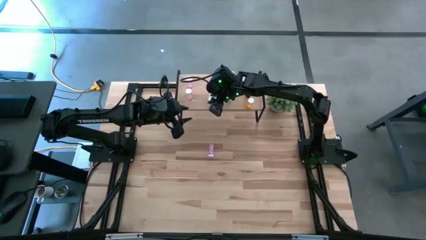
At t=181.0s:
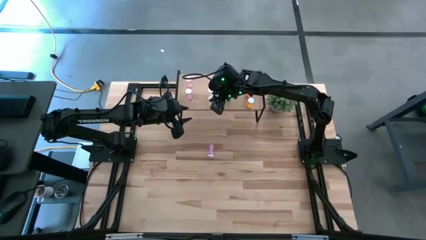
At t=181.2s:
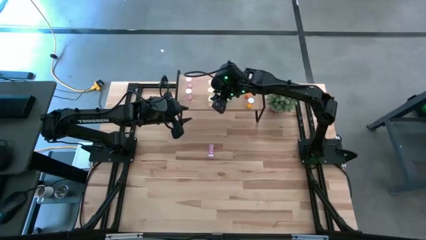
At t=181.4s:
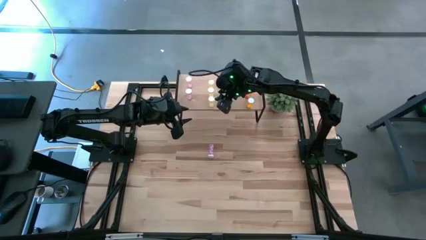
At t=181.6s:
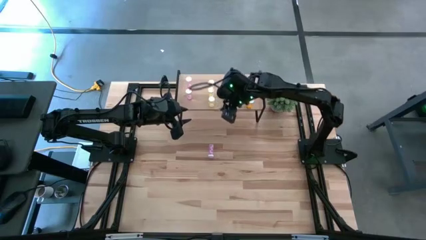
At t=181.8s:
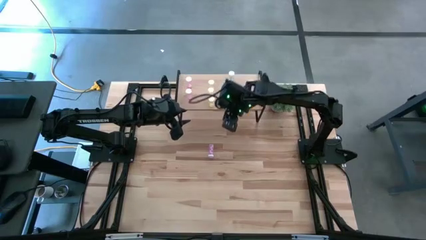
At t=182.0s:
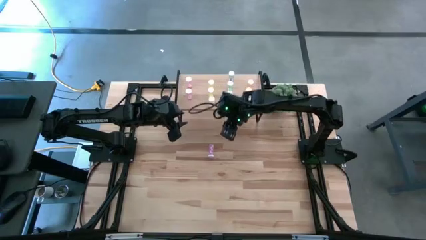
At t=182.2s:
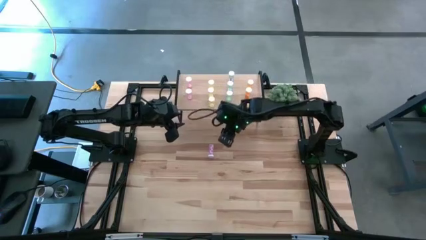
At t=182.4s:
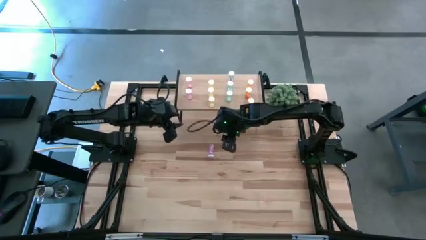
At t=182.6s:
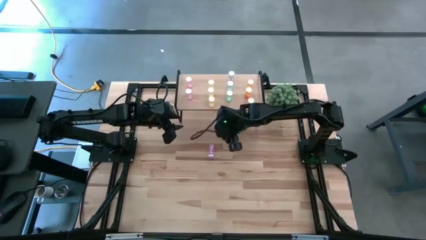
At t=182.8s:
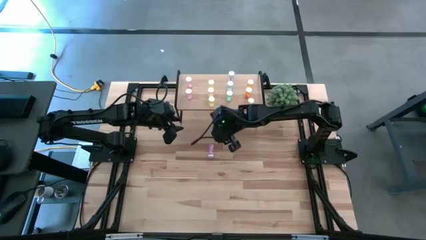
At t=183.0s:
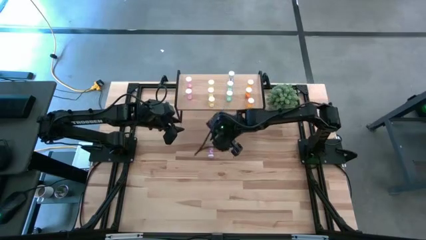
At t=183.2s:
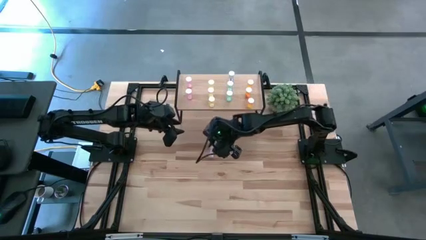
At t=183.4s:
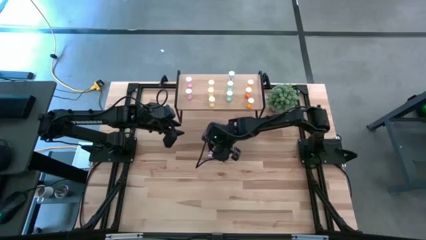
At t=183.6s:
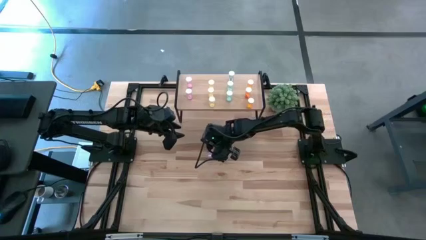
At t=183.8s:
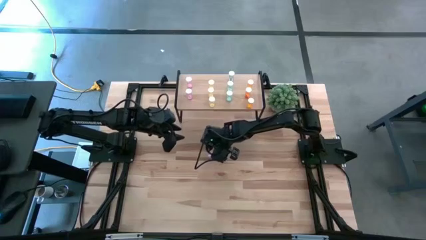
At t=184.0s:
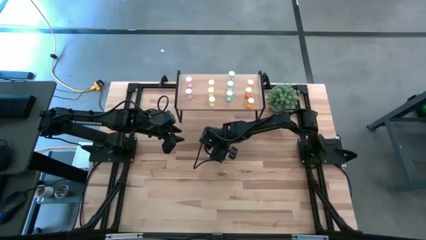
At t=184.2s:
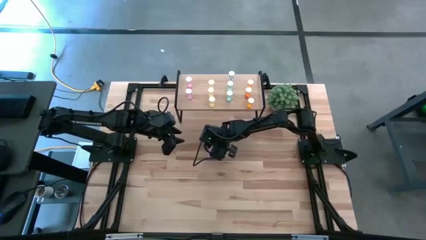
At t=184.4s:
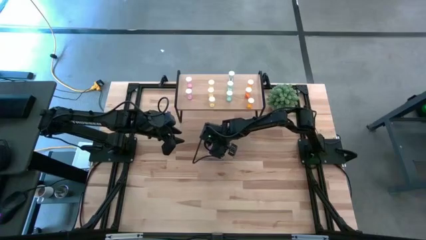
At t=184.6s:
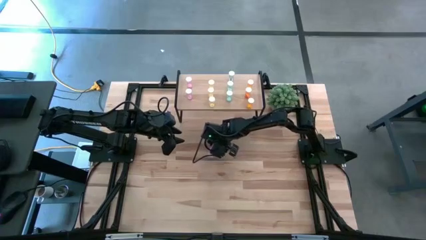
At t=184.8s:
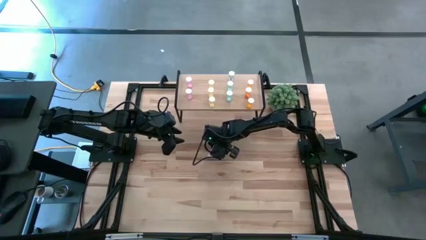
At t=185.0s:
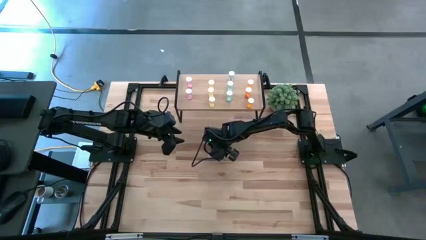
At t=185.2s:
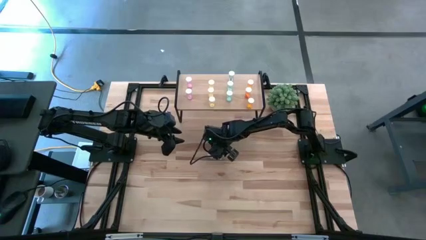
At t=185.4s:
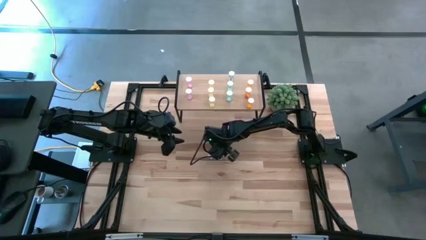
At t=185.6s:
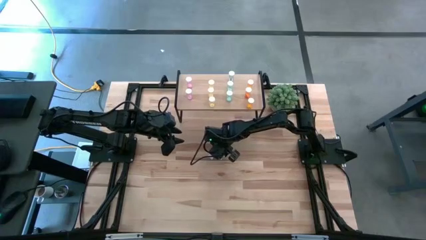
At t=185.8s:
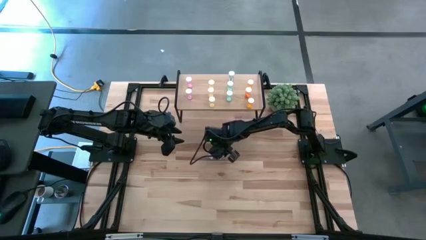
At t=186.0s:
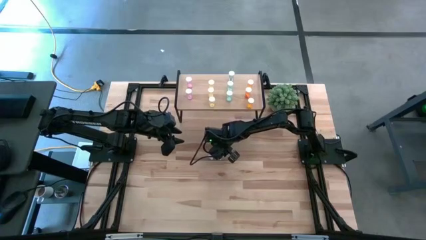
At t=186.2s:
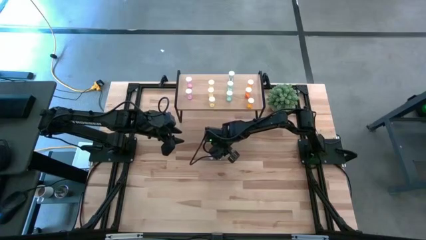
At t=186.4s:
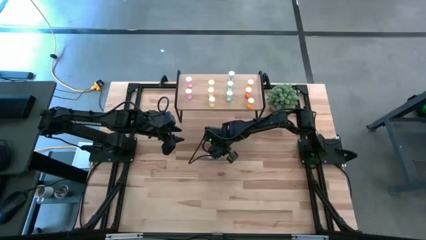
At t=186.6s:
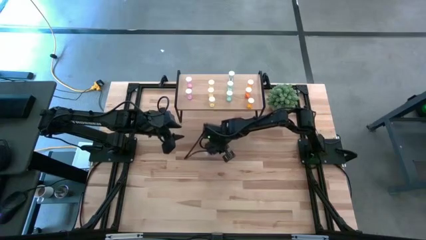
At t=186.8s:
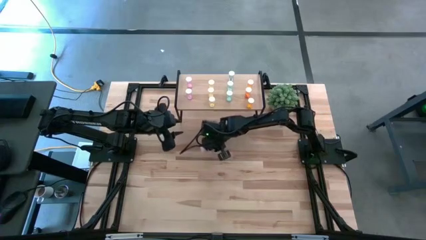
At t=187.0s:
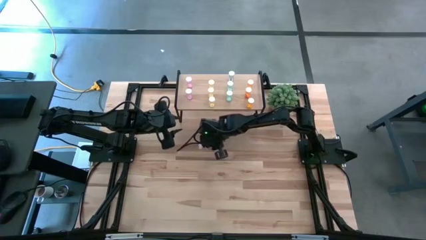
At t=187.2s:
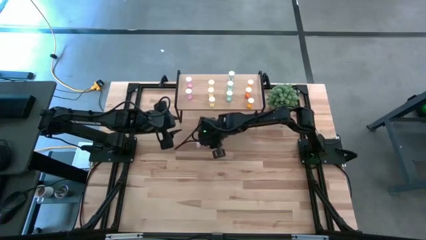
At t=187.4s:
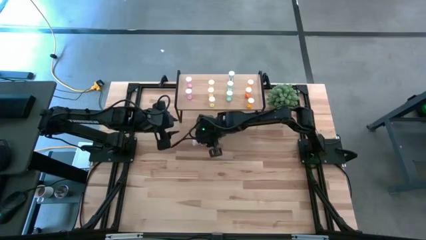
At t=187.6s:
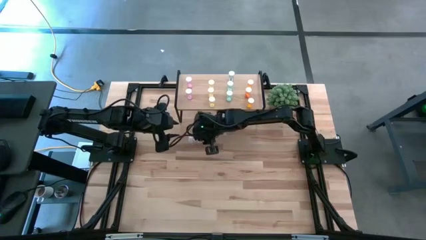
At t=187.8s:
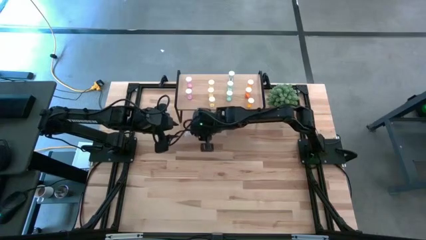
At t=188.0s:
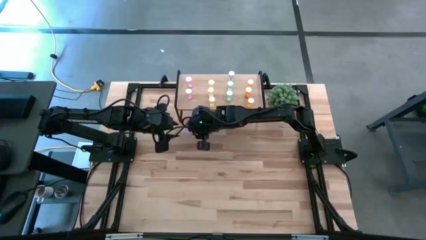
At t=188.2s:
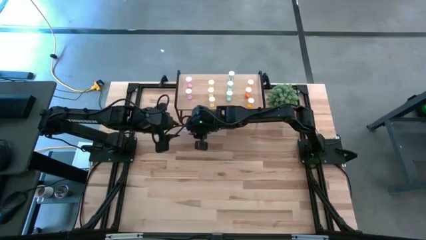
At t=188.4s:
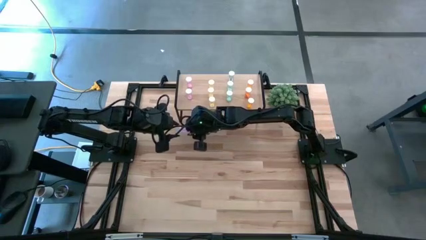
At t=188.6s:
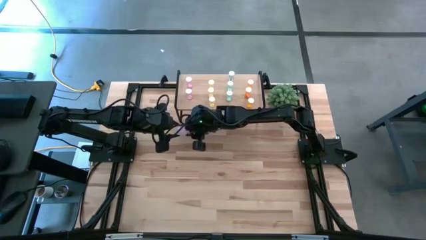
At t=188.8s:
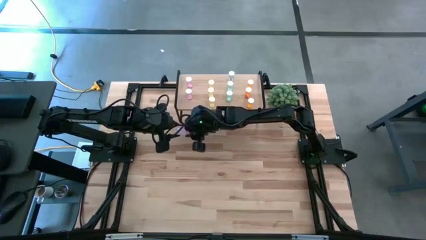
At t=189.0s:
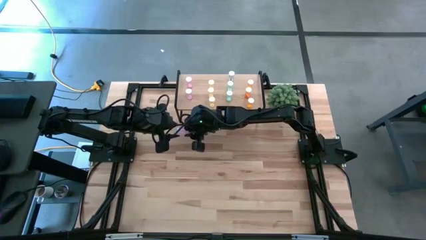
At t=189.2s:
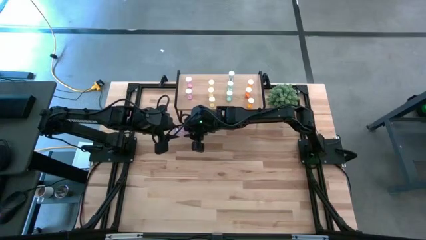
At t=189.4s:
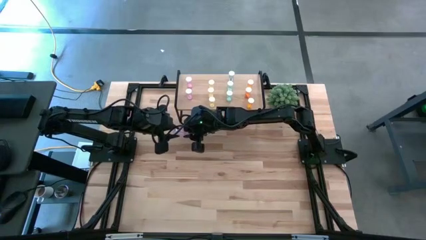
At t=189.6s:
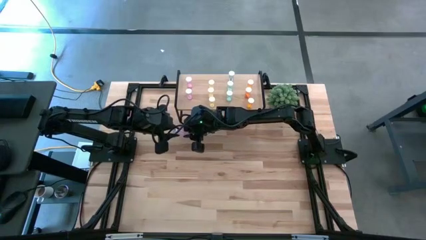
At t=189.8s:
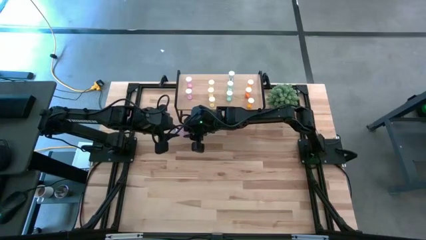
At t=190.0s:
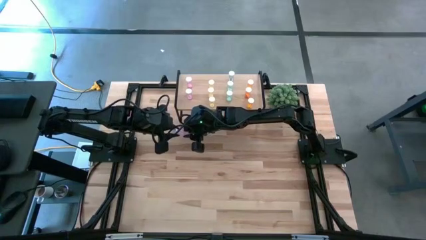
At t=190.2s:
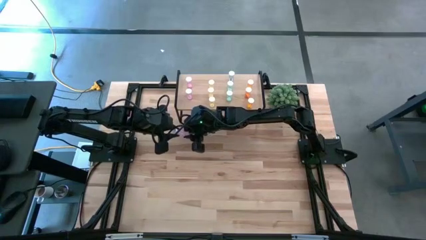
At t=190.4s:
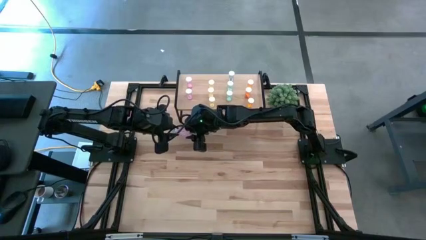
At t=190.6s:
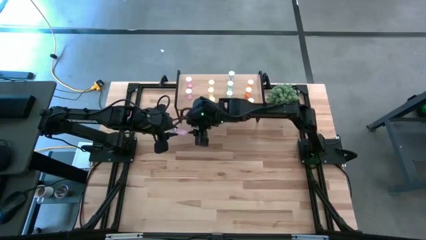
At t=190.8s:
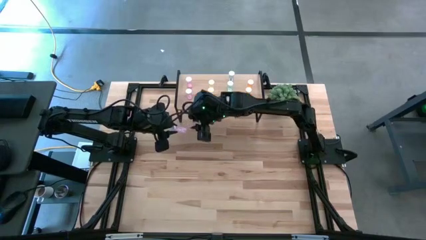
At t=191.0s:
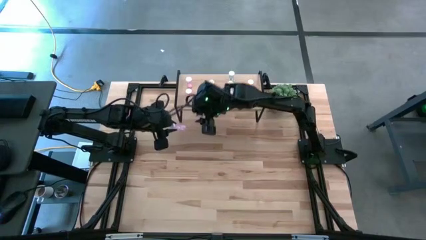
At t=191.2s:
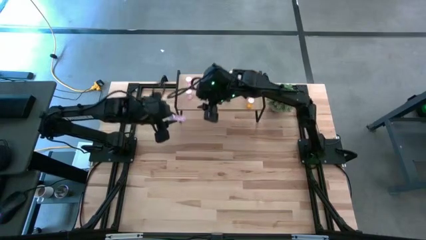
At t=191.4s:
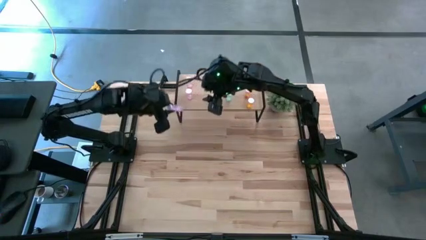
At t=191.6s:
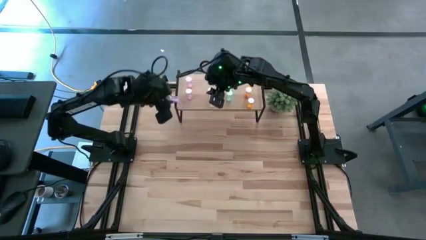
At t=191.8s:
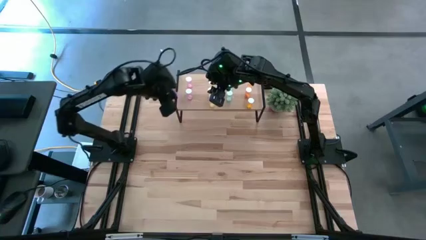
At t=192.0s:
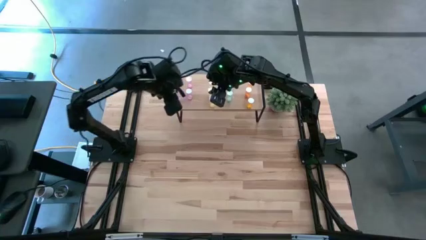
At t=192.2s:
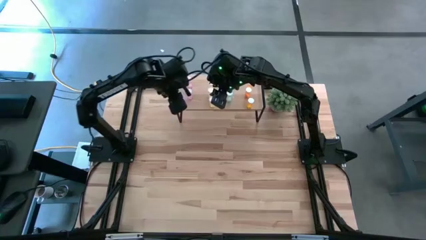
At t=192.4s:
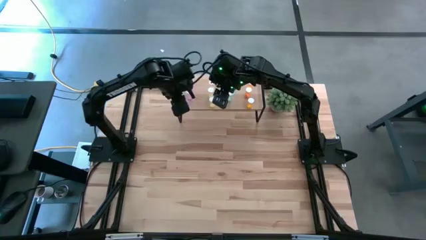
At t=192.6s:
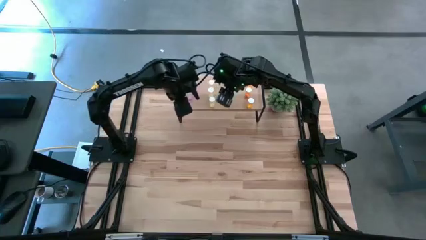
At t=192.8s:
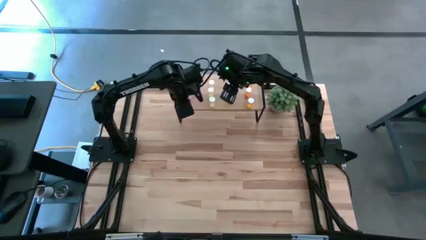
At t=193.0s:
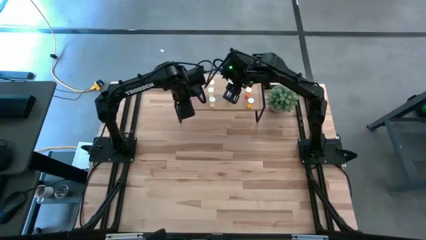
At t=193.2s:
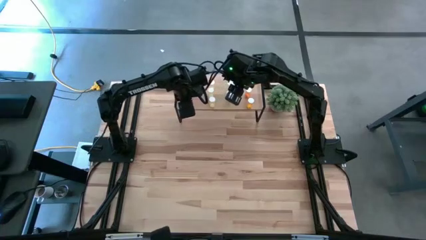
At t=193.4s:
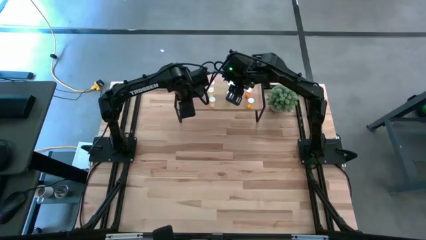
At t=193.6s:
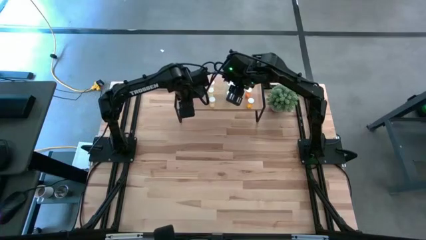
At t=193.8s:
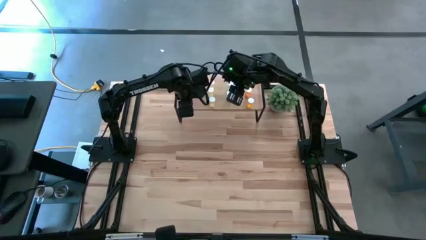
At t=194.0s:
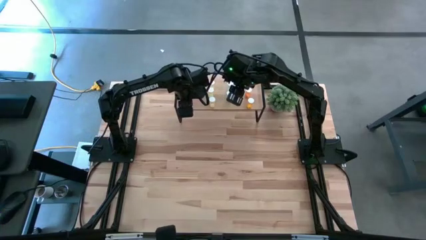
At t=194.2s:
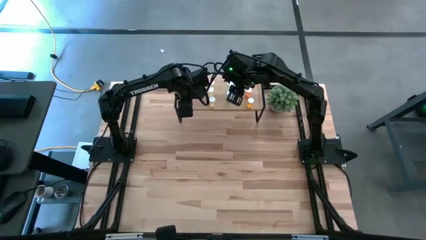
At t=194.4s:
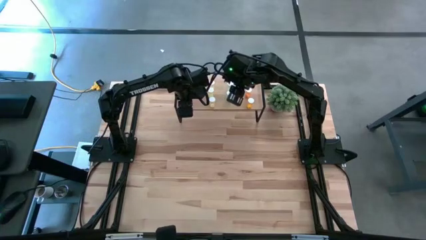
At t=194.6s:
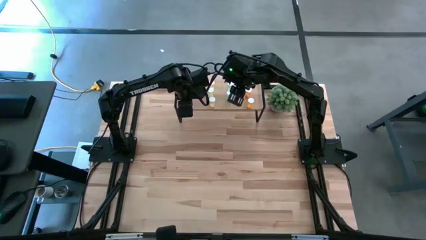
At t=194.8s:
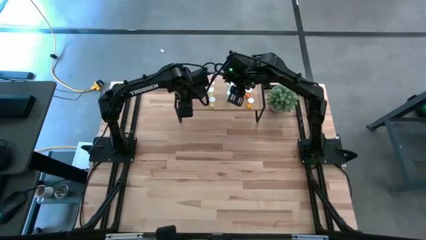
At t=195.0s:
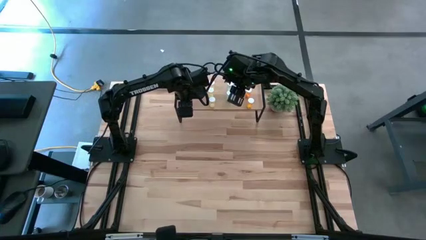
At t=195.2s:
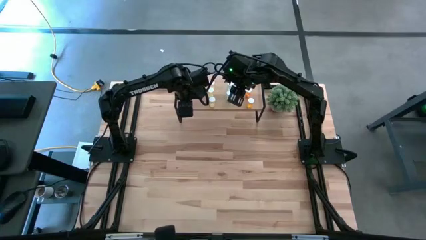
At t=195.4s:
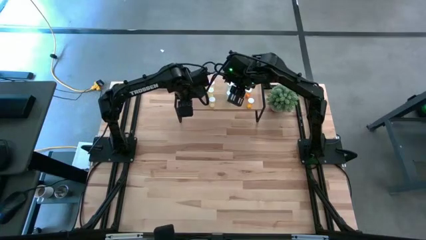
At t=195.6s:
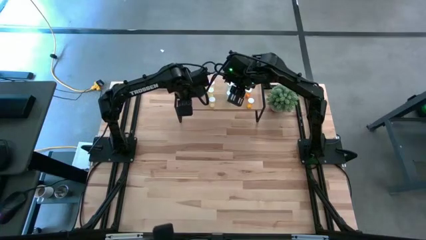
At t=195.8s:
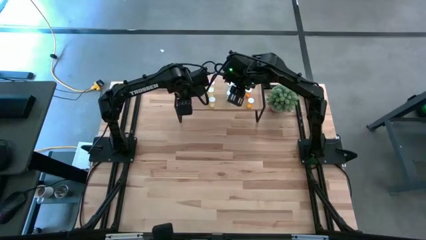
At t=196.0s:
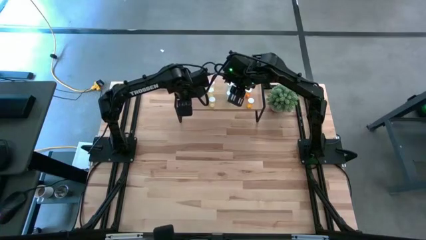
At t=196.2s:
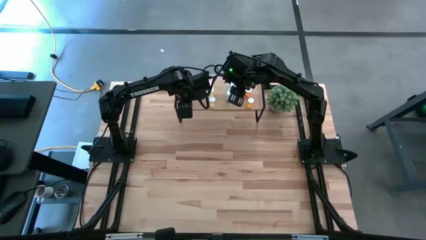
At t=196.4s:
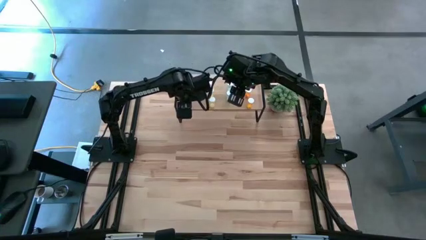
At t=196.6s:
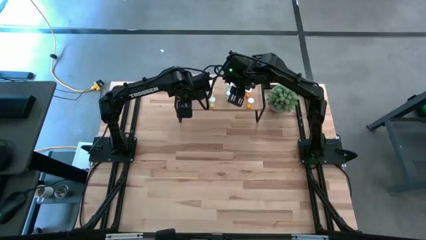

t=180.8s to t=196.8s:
Task: Pick and place medicine bottles onto shelf by color
Put the pink pill bottle with the other pink pill bottles on the shelf

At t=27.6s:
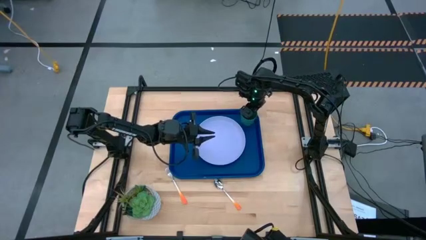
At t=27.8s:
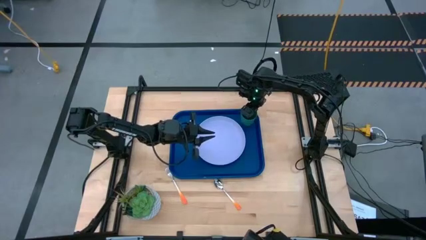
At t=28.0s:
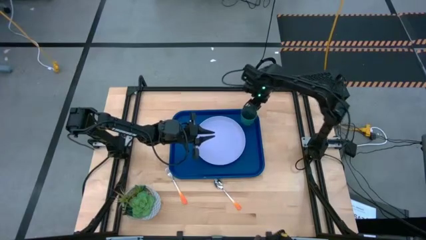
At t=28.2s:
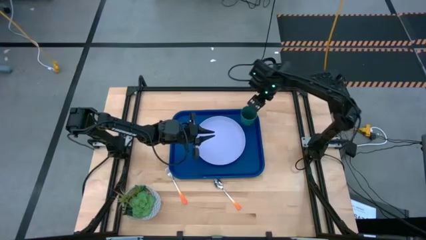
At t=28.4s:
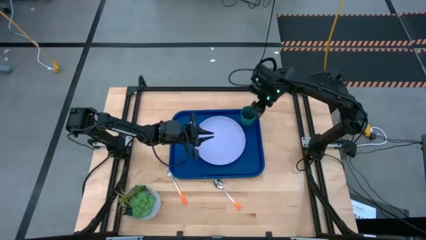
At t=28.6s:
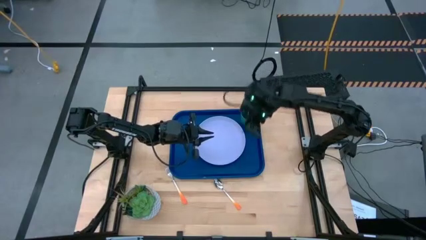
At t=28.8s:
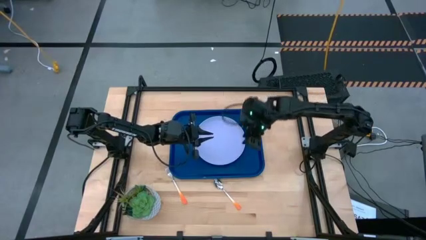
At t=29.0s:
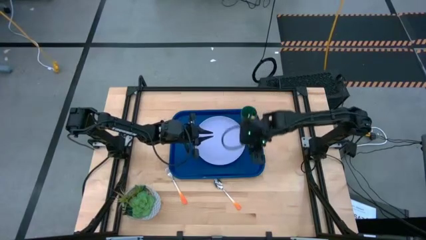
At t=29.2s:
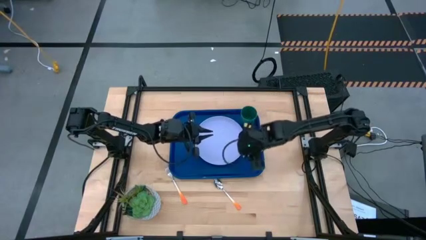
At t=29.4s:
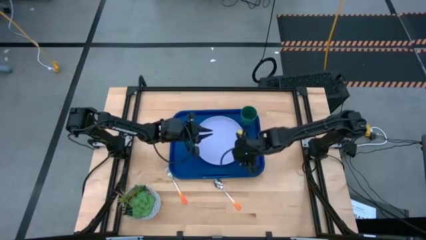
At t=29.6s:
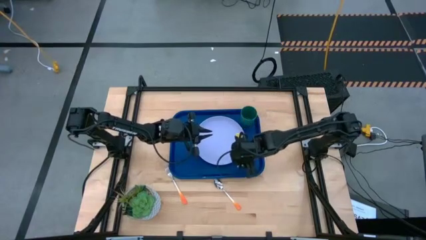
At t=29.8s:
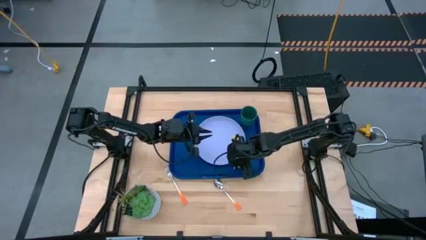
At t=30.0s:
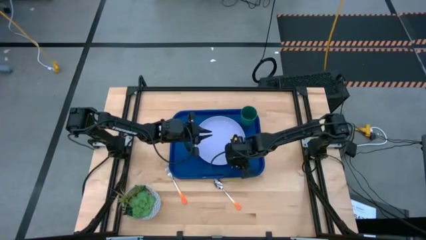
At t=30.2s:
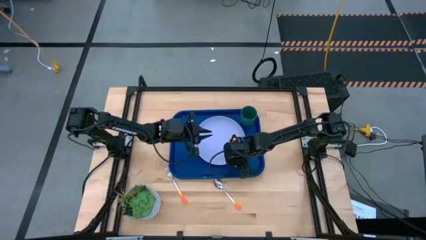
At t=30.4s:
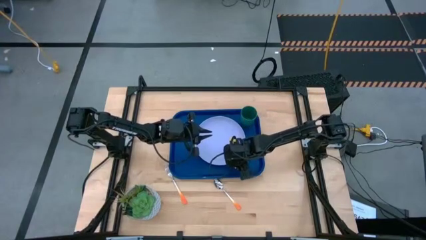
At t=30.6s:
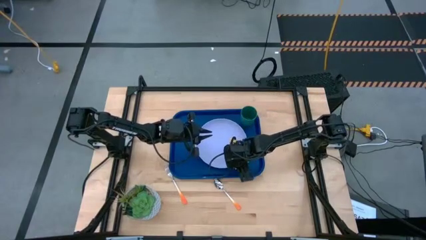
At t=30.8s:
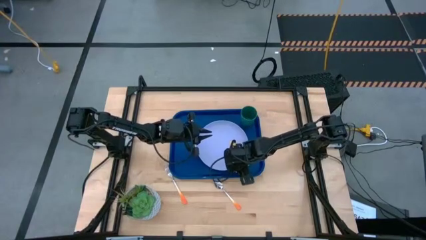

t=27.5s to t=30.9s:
Task: Pick and place plate/cup/fork/spoon on tray
Adjust the blue plate on the blue serving tray
